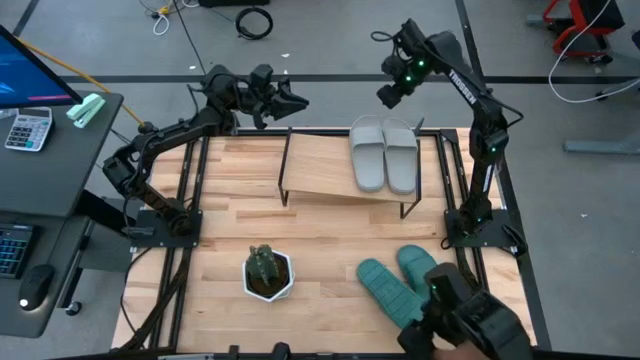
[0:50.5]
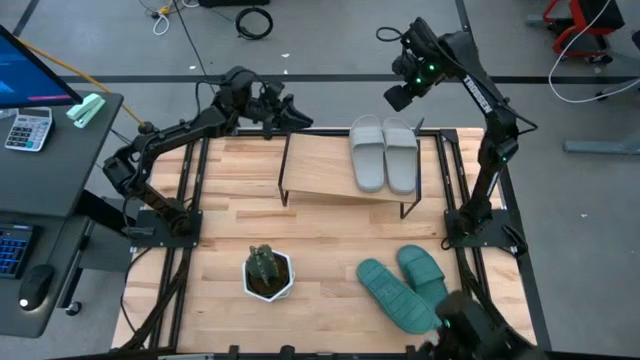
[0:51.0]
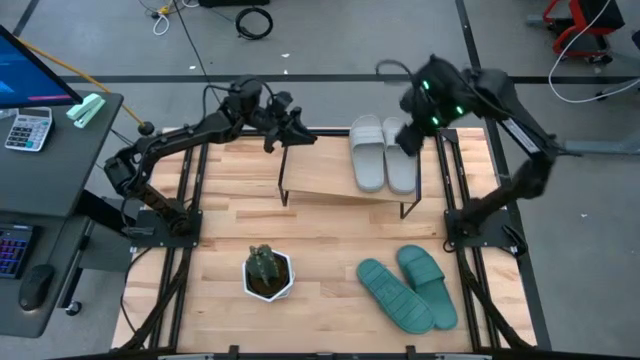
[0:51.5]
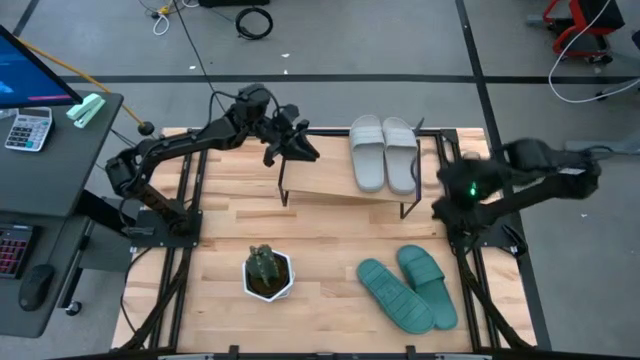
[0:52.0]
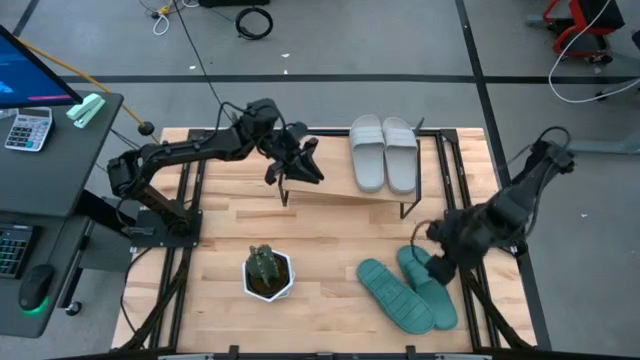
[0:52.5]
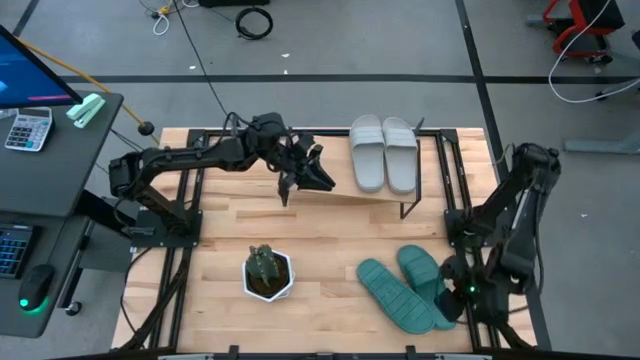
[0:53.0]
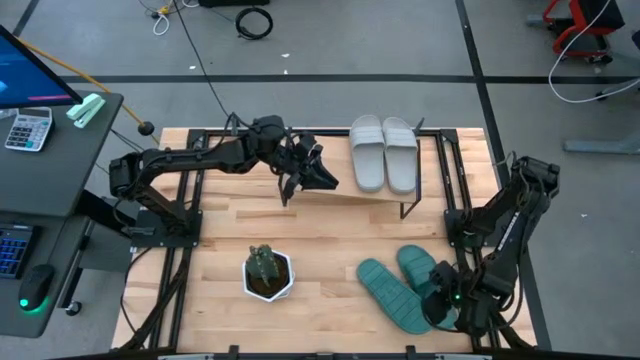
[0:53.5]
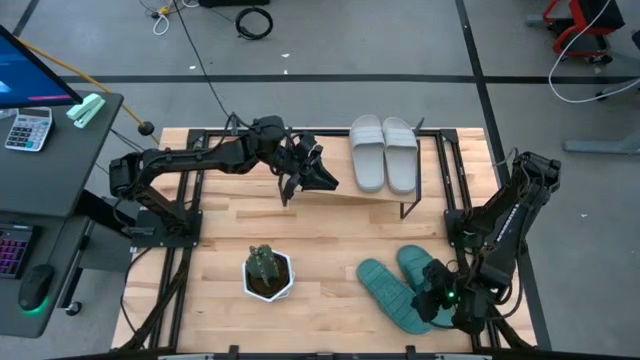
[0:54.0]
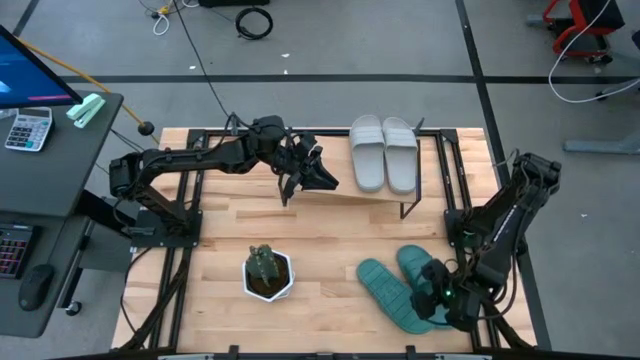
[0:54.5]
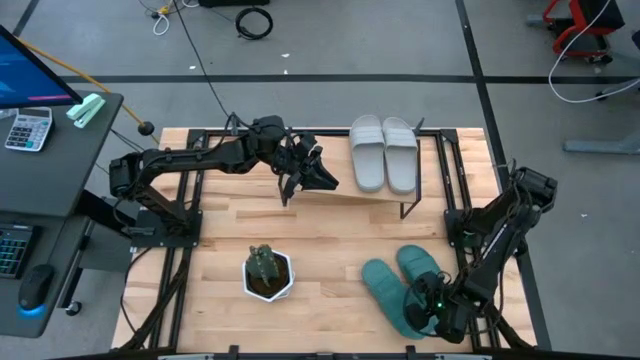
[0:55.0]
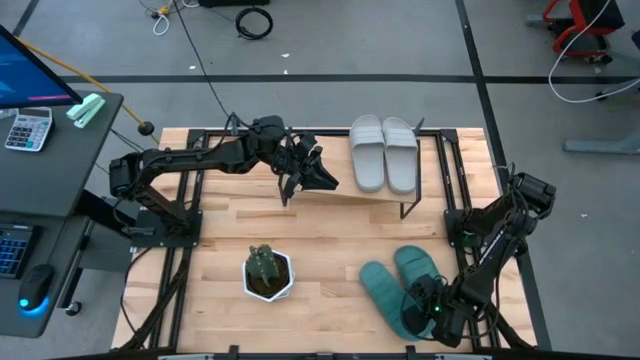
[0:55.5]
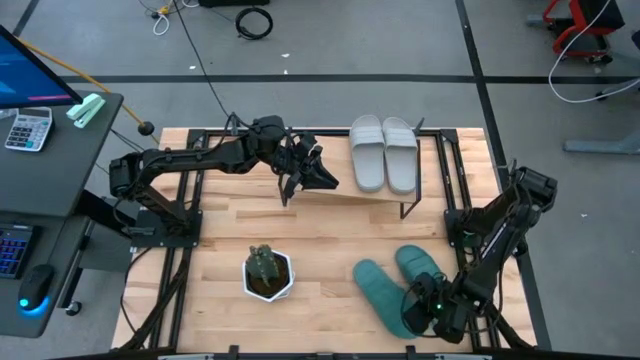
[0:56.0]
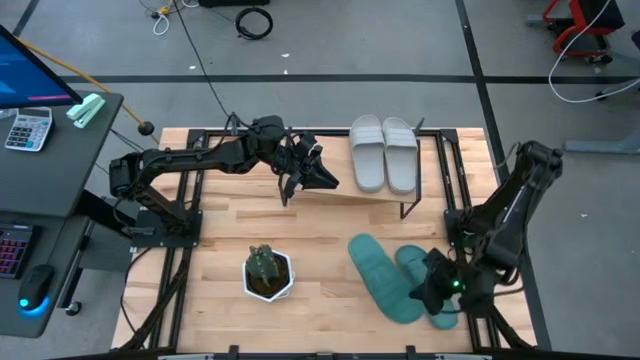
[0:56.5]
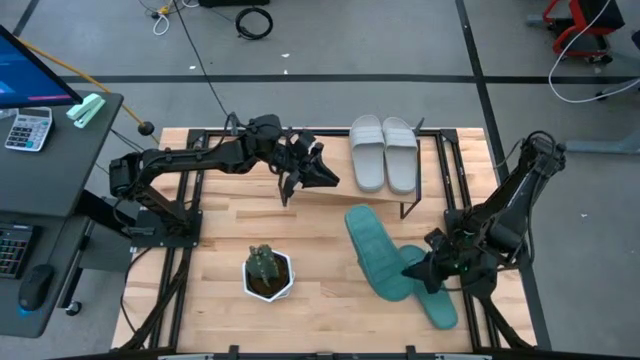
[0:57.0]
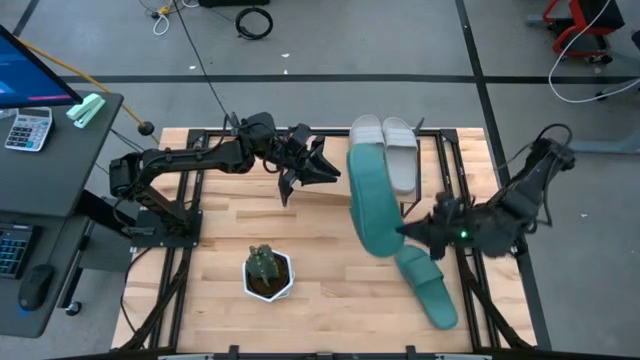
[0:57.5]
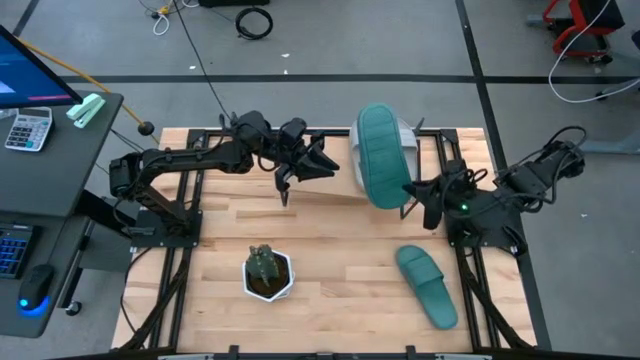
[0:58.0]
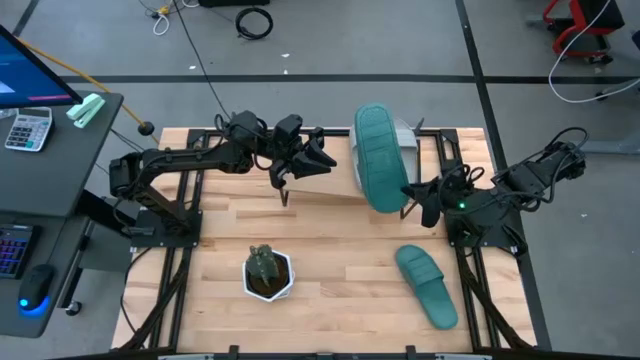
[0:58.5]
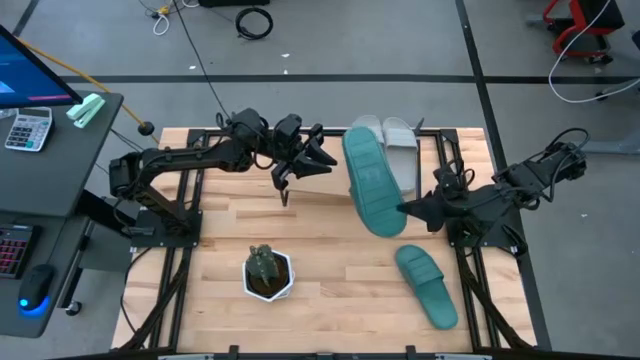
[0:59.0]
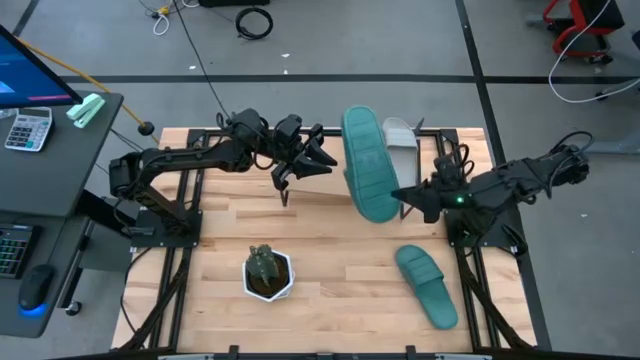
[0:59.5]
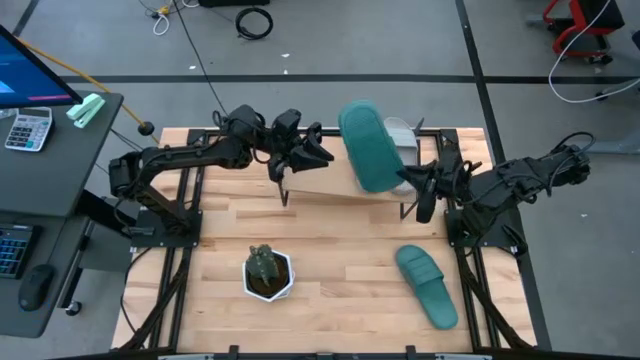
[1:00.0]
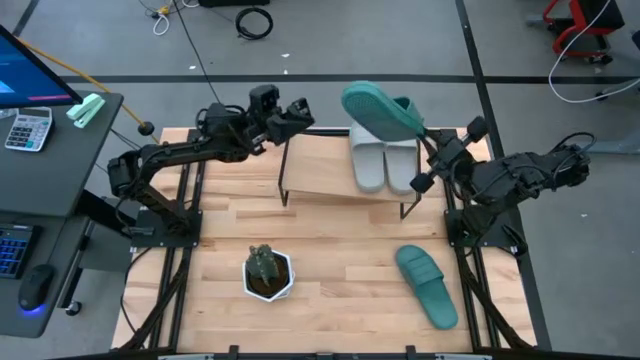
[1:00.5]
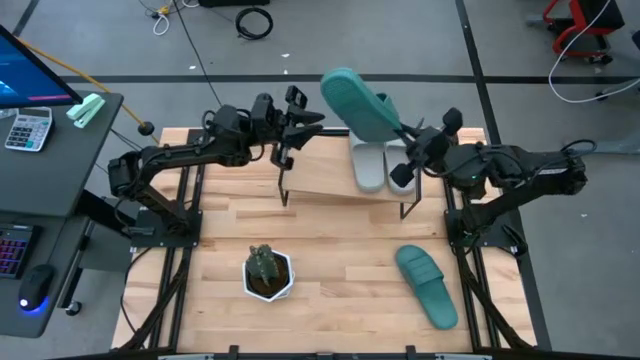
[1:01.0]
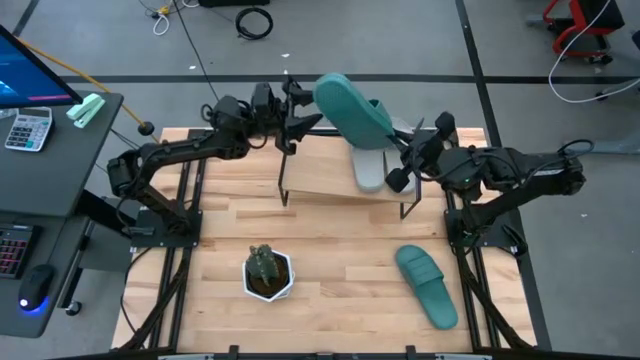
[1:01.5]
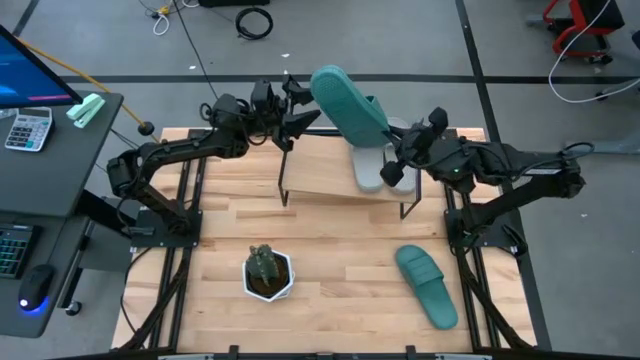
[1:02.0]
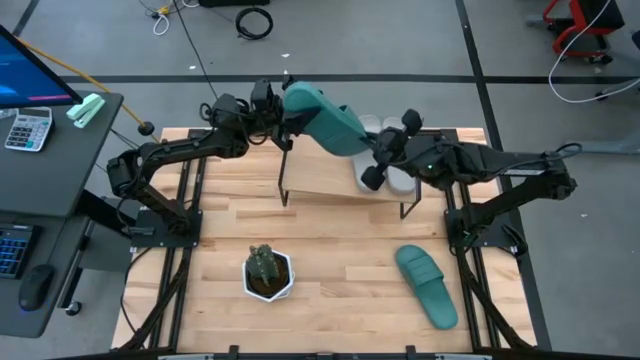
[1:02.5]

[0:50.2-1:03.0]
Task: Pick and place slides into the shelf
Put the left green slide on the shelf
